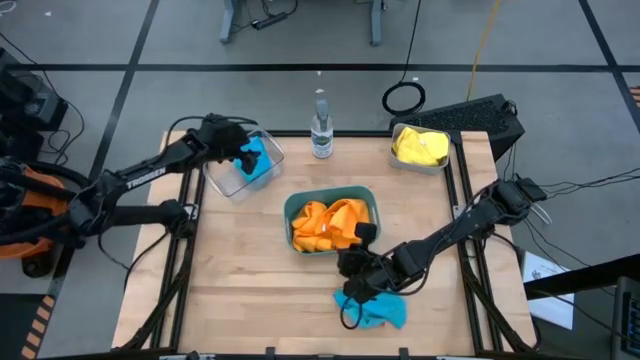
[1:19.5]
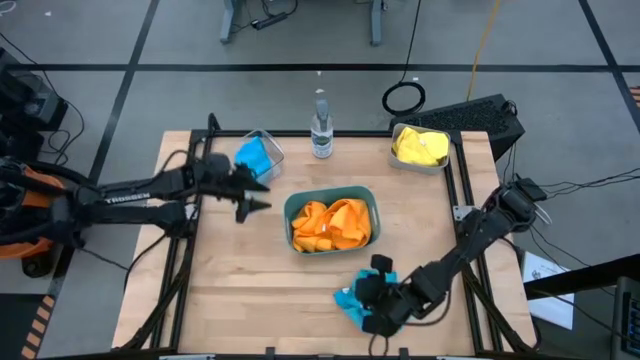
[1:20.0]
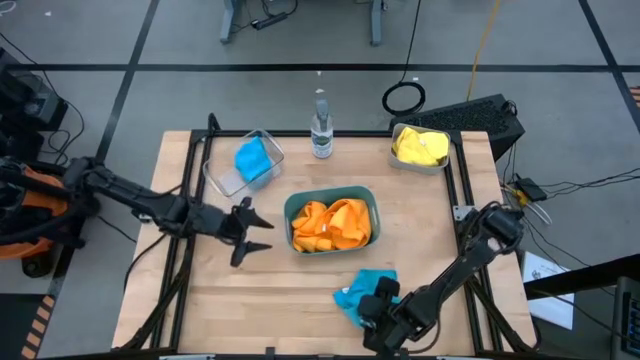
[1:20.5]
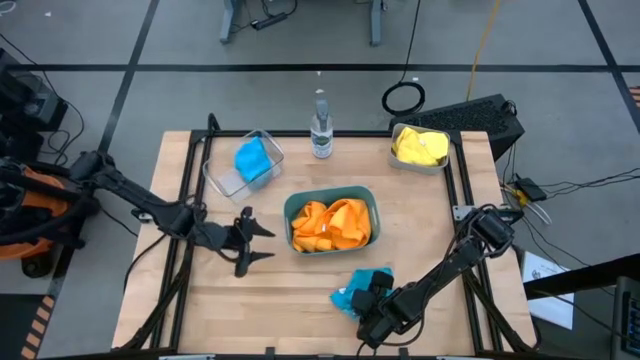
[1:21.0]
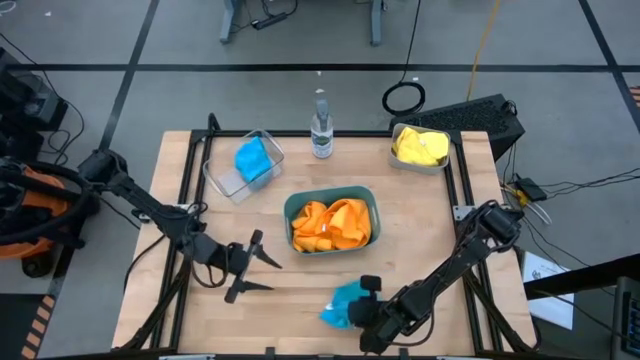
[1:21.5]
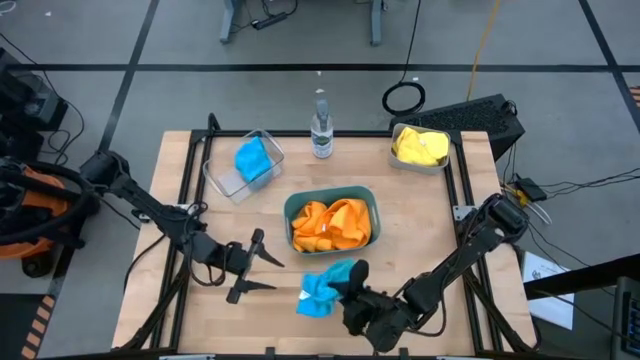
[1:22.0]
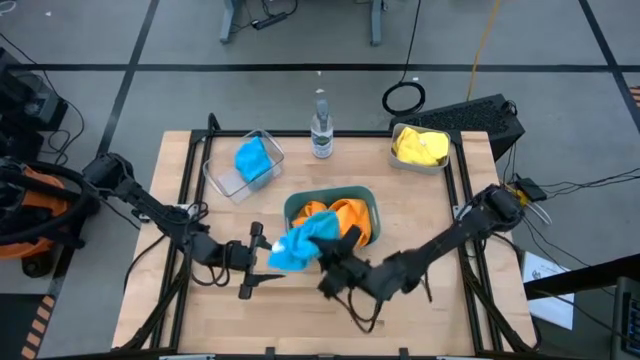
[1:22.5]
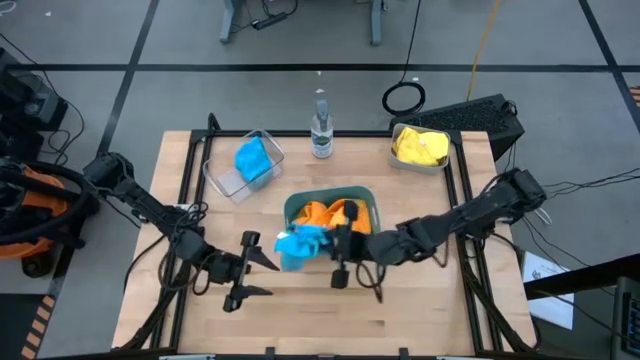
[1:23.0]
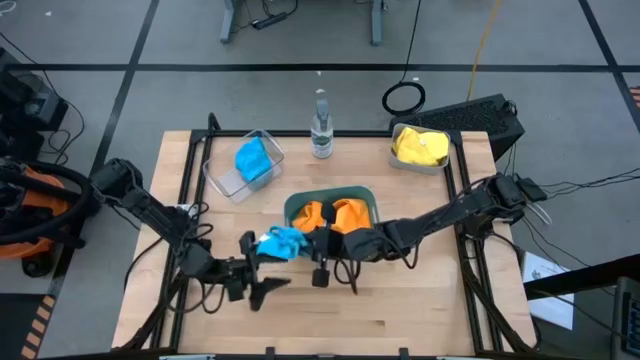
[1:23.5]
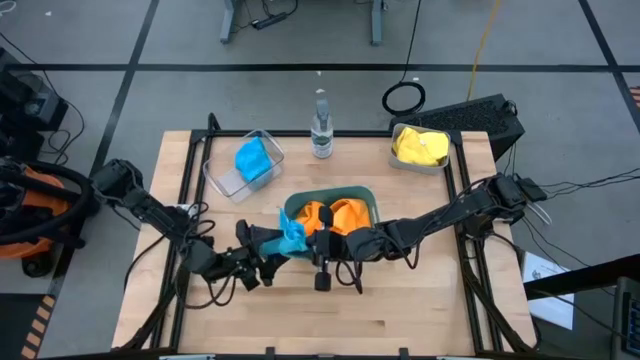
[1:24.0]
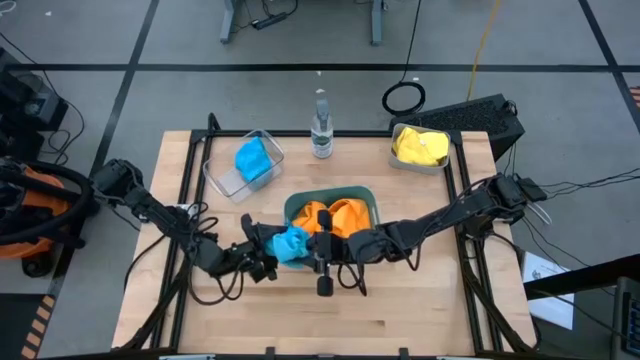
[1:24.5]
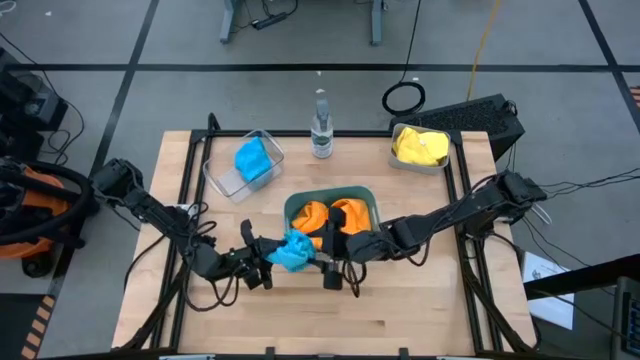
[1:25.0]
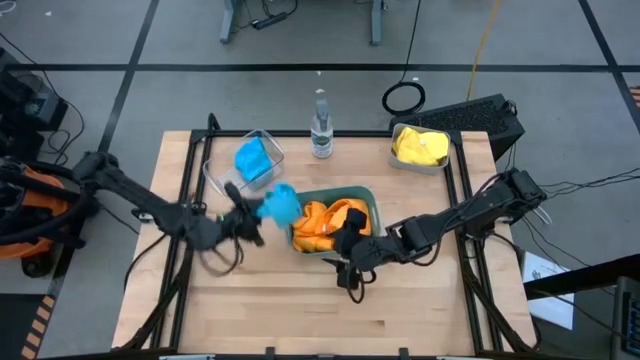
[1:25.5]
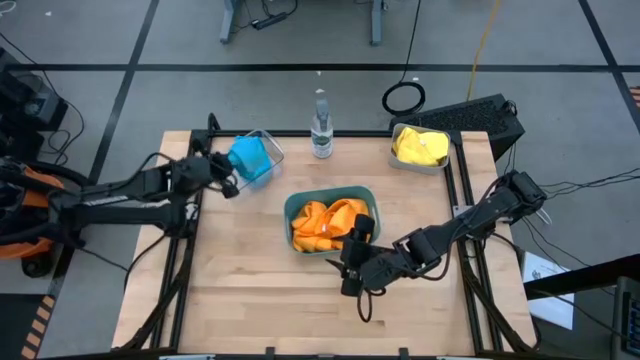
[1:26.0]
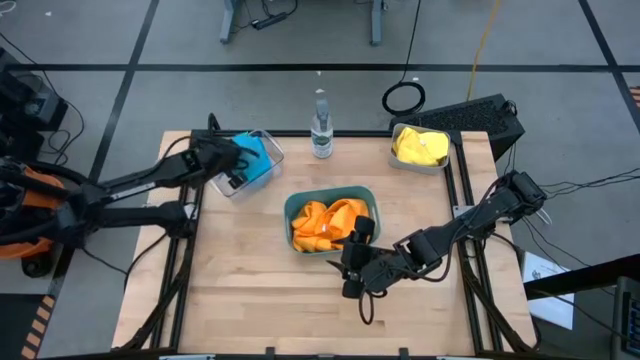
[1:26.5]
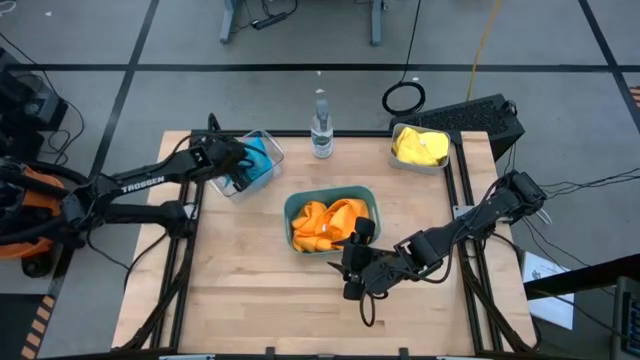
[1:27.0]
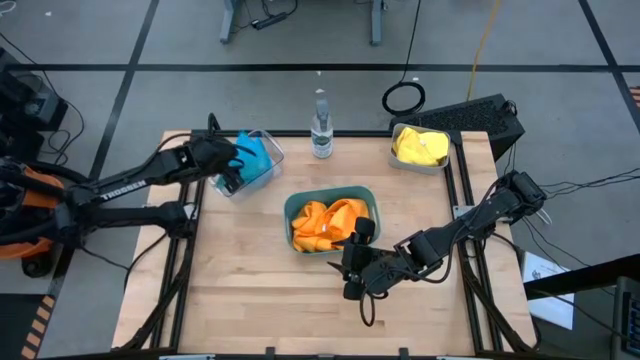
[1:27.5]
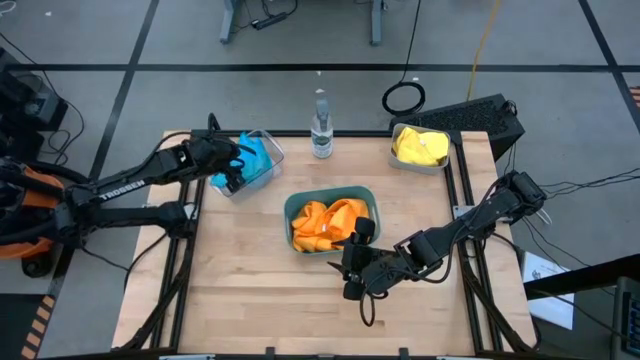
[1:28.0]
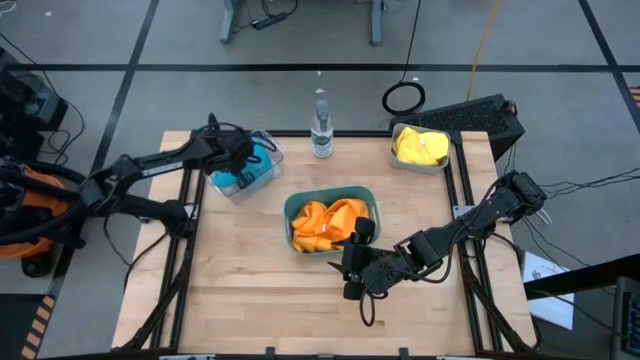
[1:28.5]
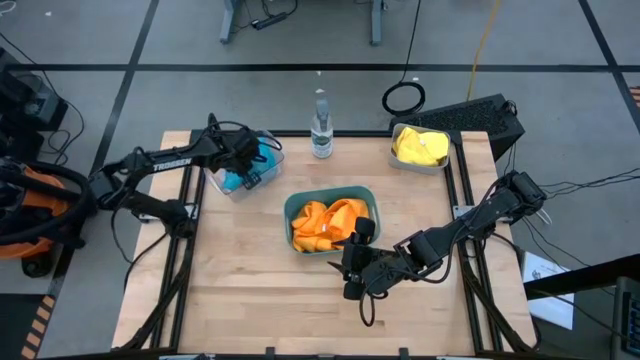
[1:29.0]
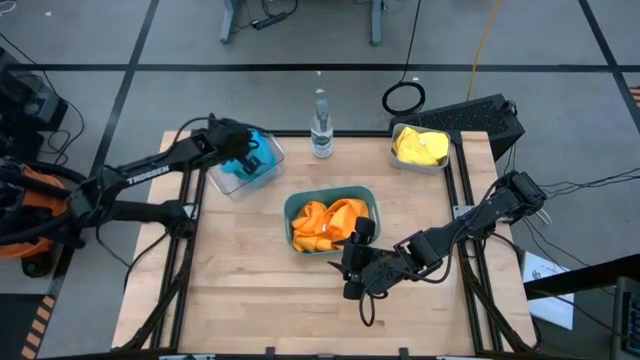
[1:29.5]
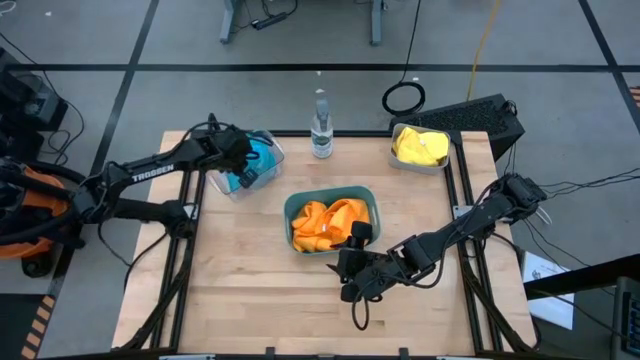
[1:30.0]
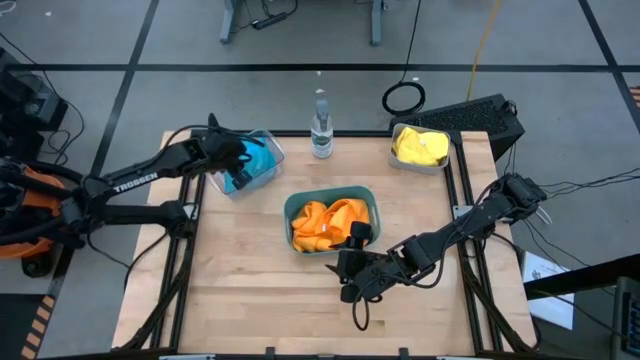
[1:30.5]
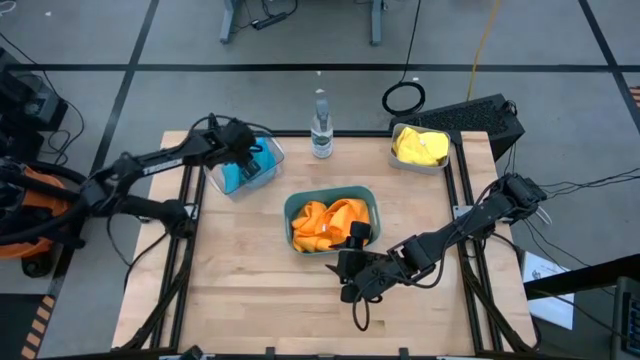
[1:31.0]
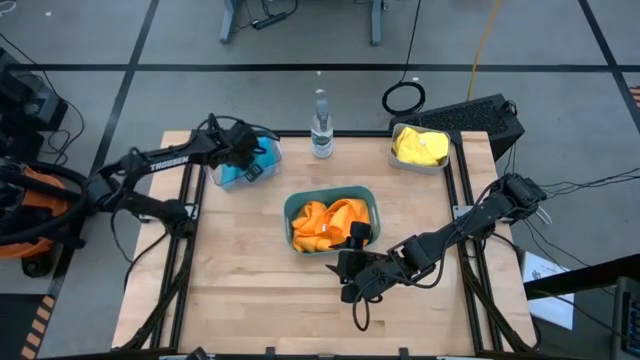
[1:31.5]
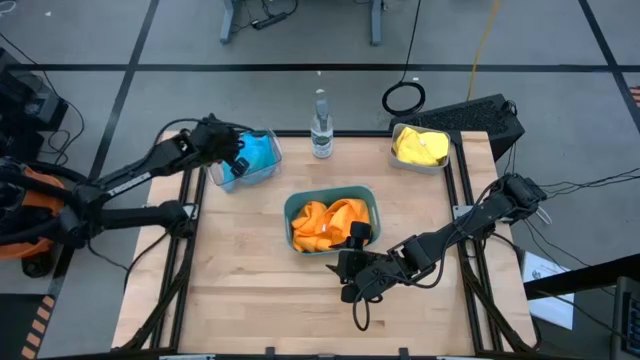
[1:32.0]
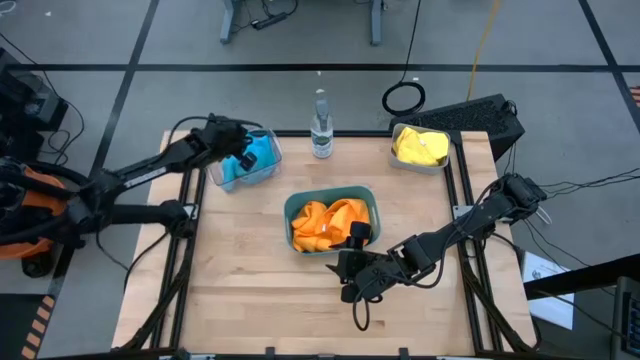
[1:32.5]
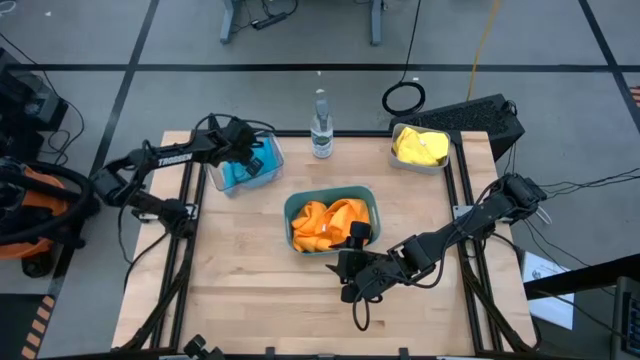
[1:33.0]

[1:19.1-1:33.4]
Task: Sort microfiber towel by color & place in baskets
Put the blue towel into the transparent bin

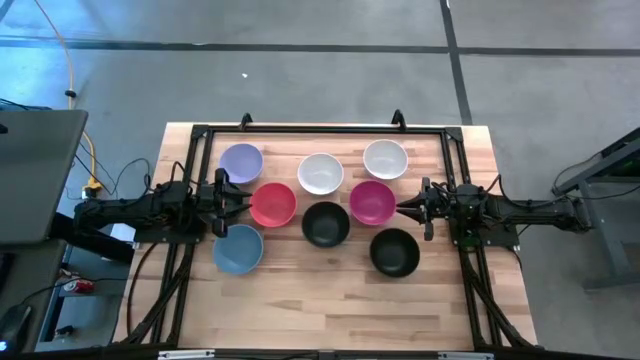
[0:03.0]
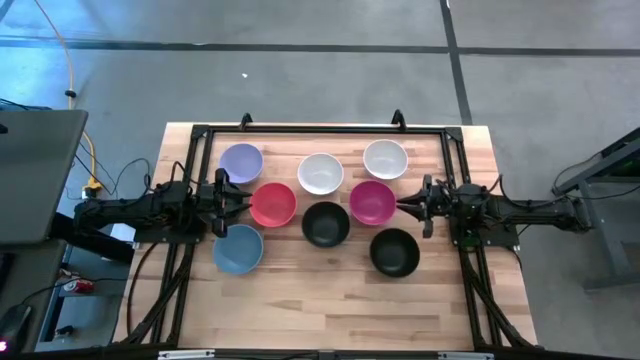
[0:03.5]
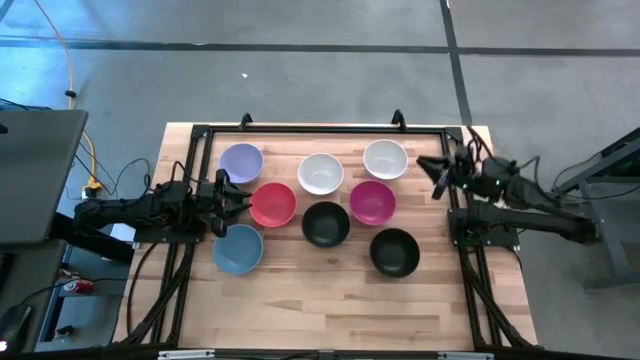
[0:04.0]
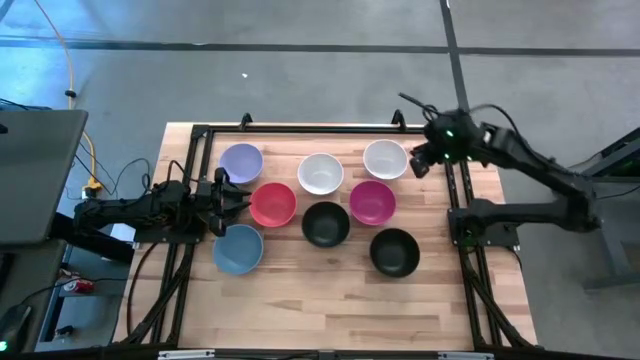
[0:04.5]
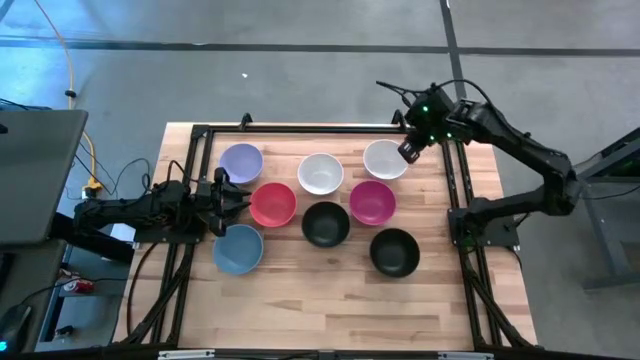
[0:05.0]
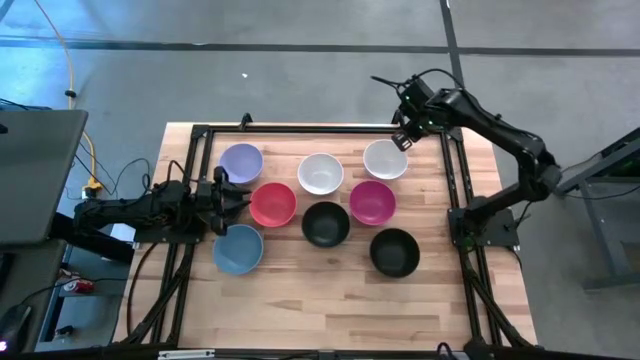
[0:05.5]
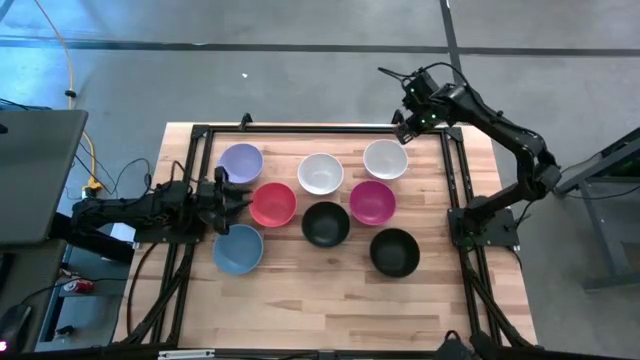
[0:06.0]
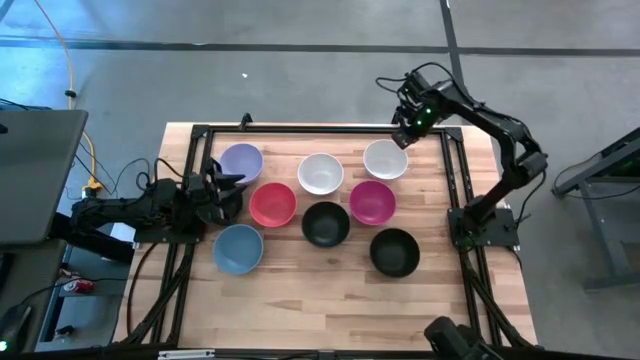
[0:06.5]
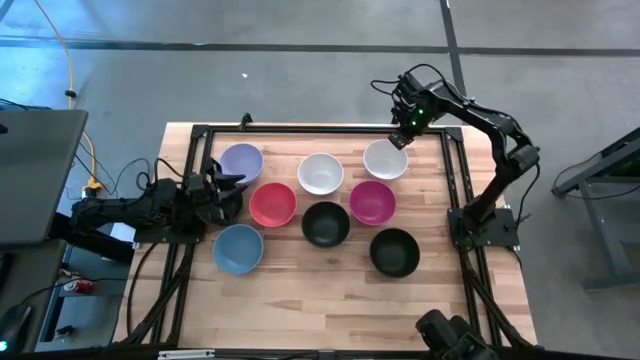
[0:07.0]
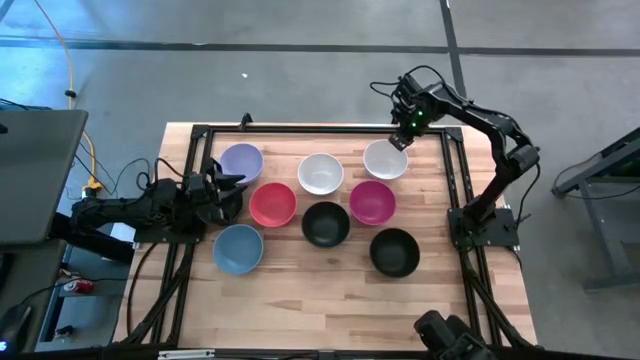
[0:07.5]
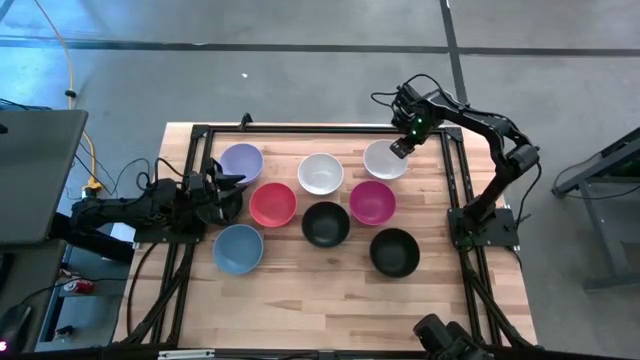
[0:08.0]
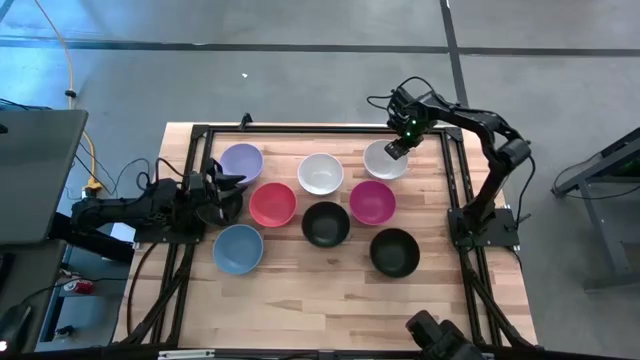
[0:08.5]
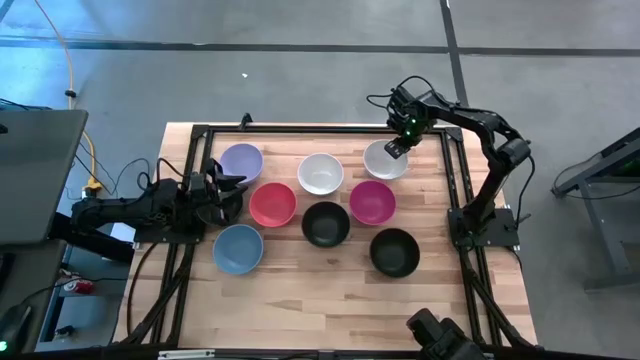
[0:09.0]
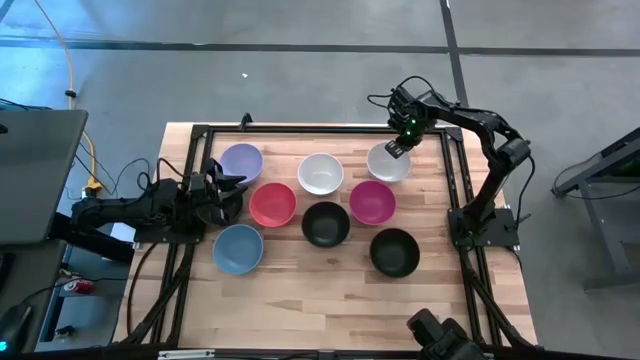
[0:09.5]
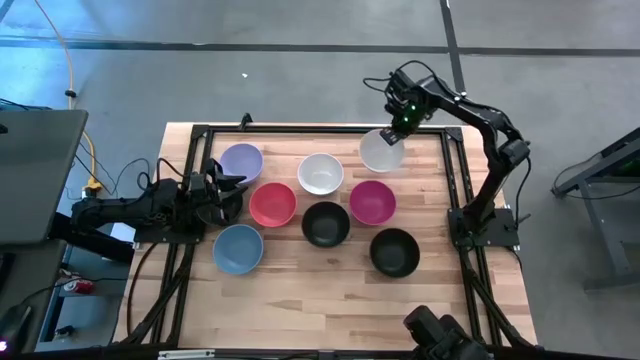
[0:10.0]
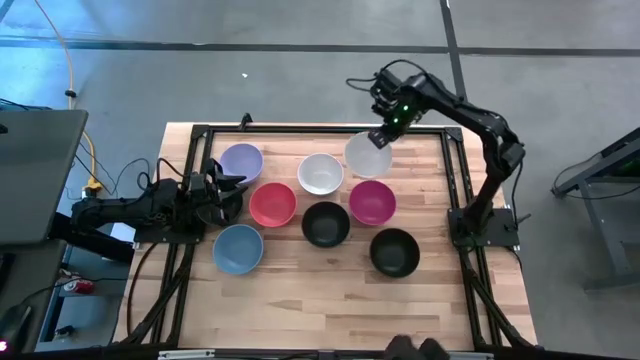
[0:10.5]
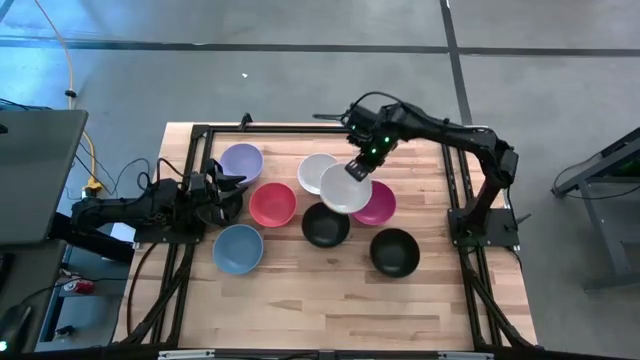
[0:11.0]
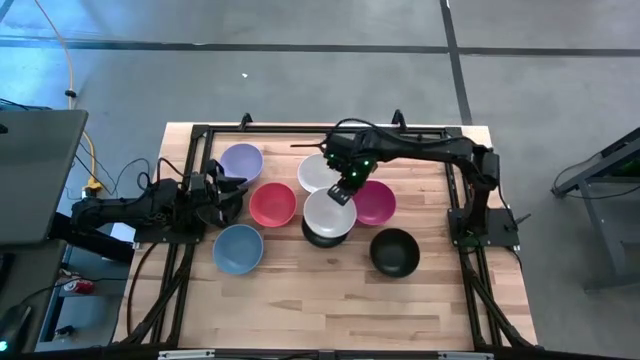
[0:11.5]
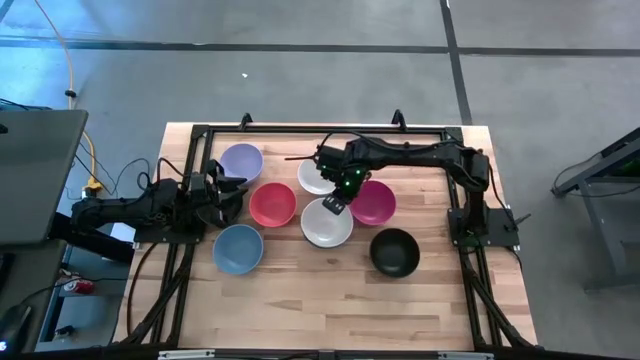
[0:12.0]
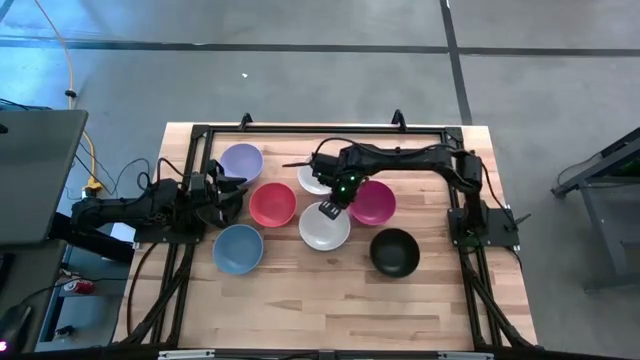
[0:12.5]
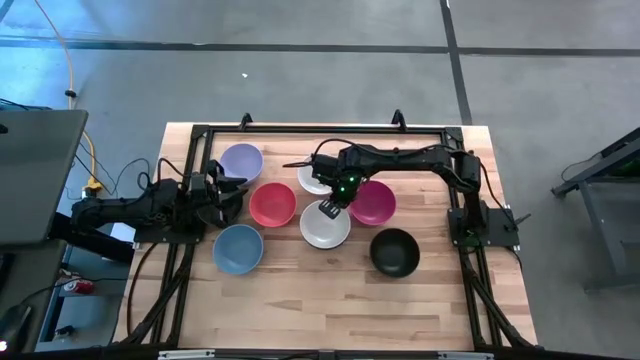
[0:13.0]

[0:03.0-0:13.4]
Task: Nest bowls inside each other
Stack the right white bowl on top of the middle black bowl
